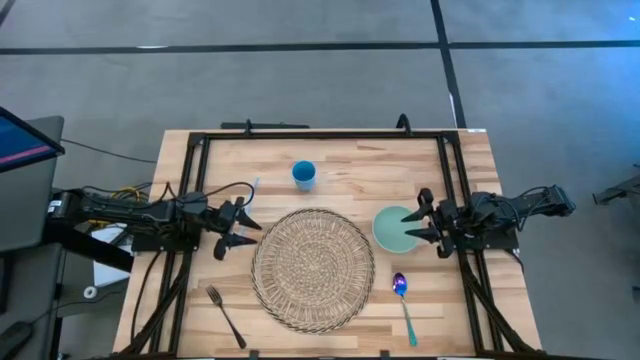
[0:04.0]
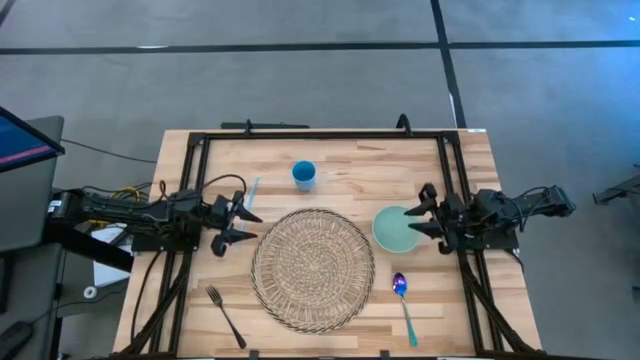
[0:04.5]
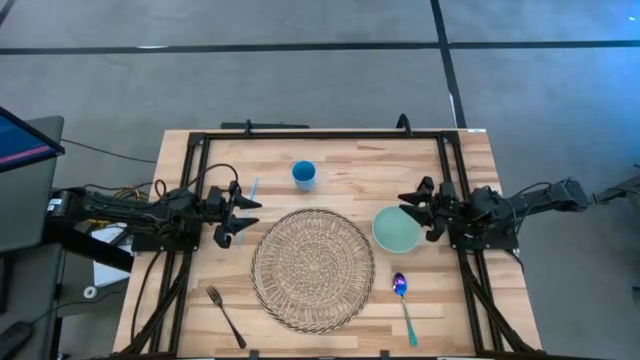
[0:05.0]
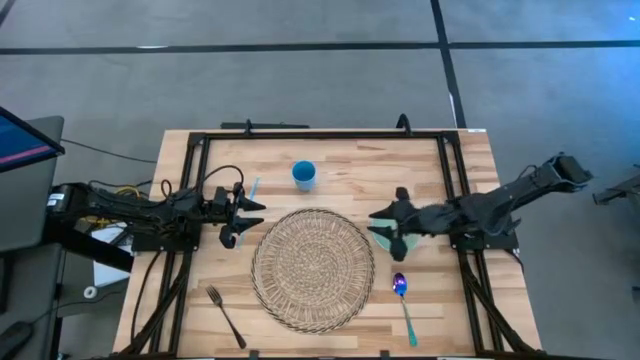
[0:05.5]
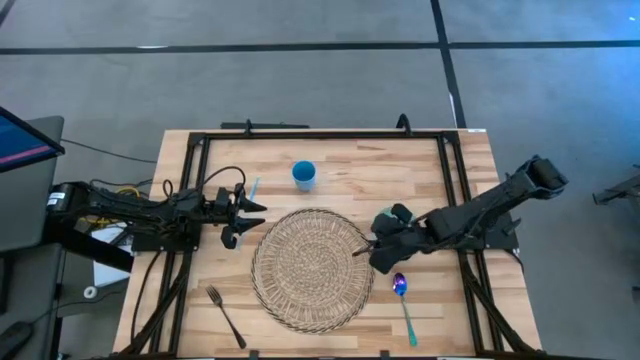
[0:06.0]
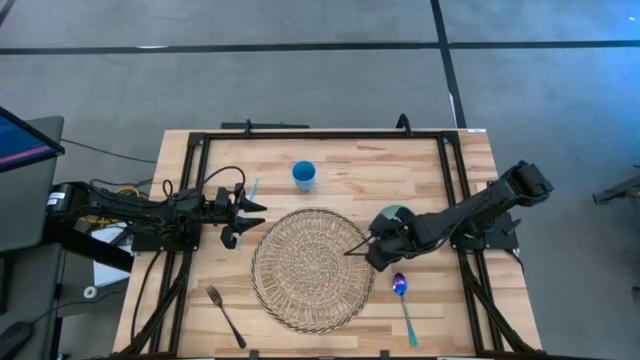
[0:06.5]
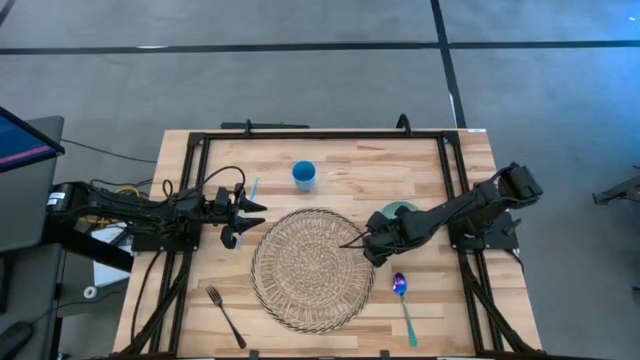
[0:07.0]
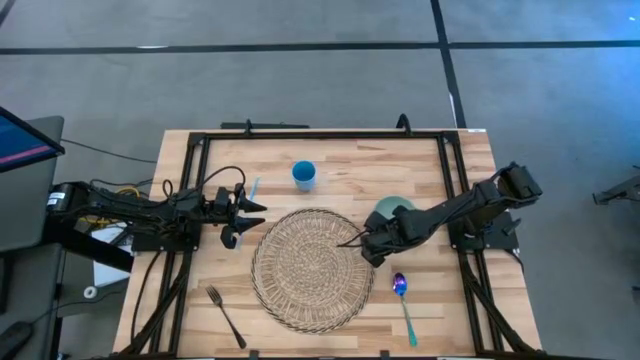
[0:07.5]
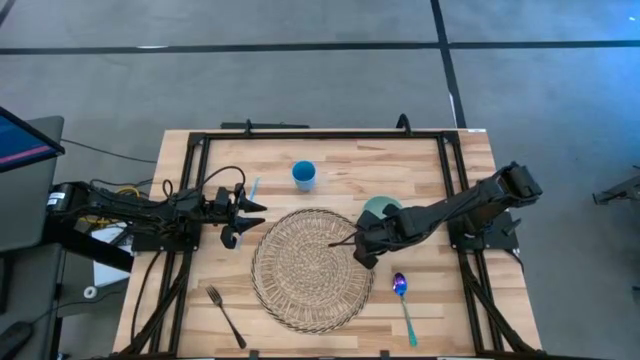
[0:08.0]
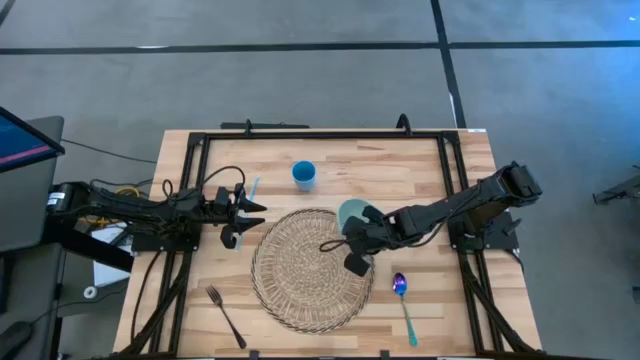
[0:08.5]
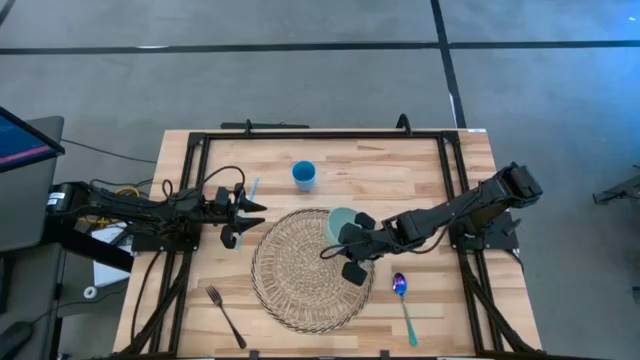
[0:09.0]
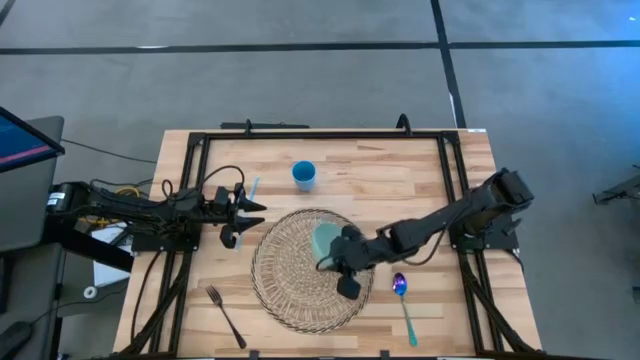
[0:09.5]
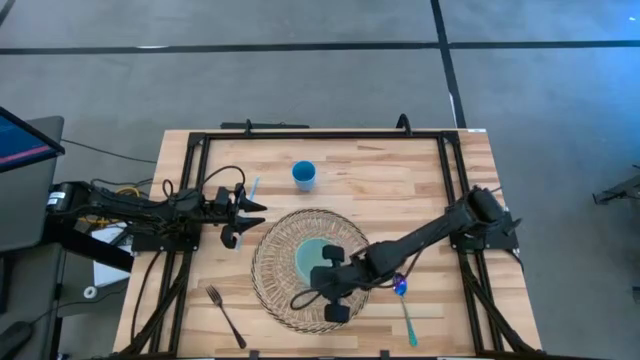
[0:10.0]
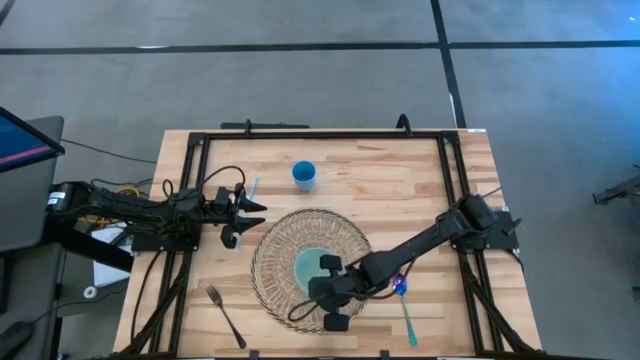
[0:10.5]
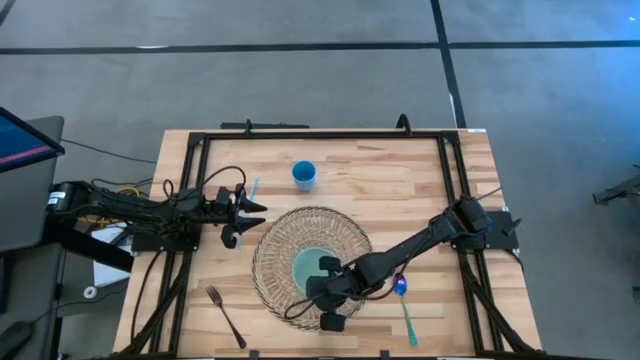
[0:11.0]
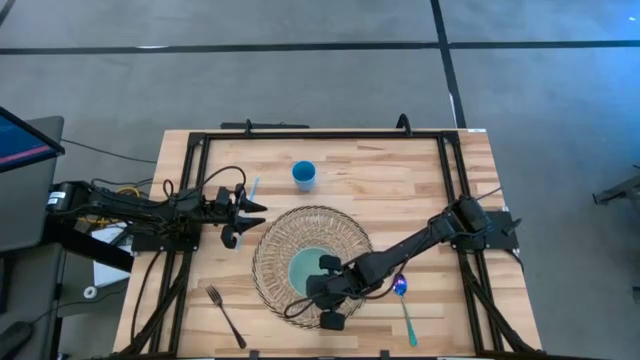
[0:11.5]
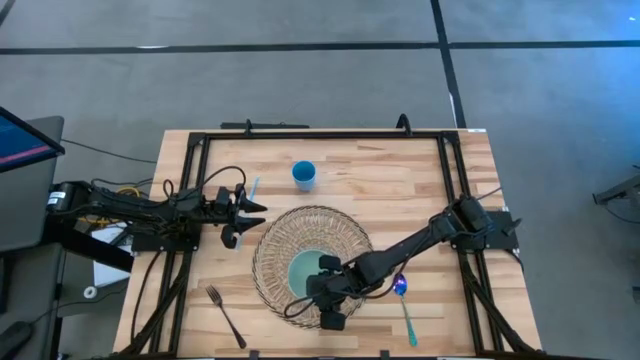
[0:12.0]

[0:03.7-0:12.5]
Task: Pick & Place Utensil
Put the green bowl on the brown placemat

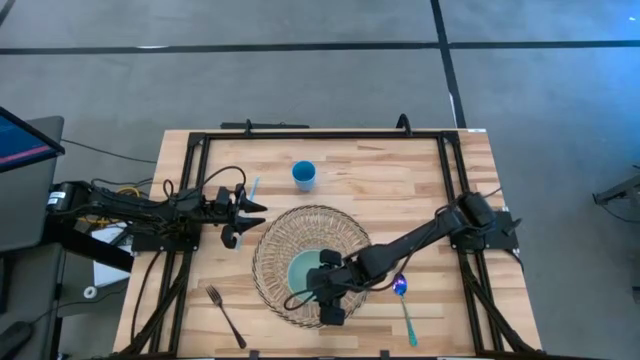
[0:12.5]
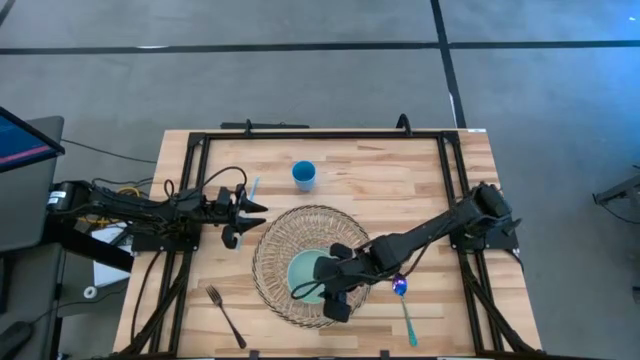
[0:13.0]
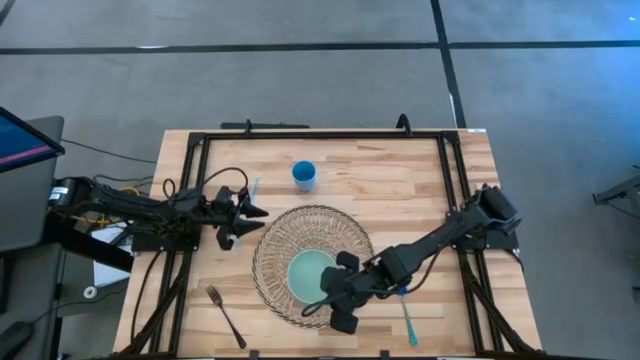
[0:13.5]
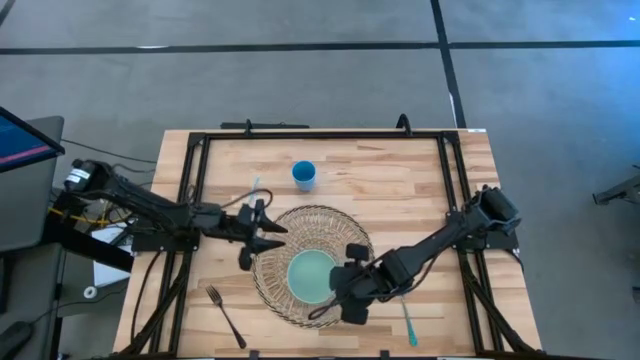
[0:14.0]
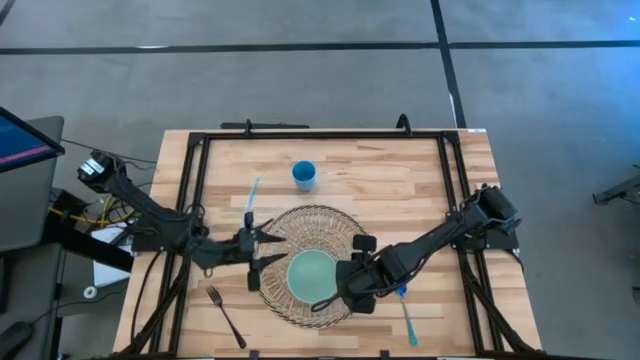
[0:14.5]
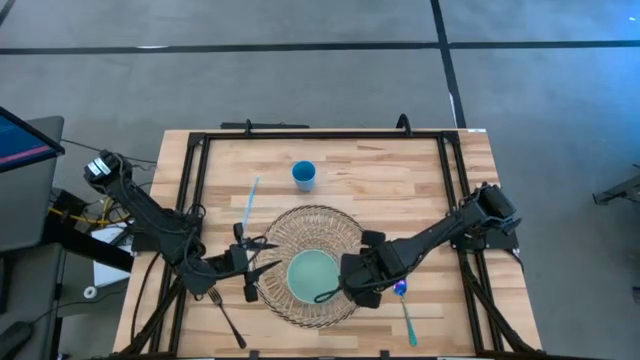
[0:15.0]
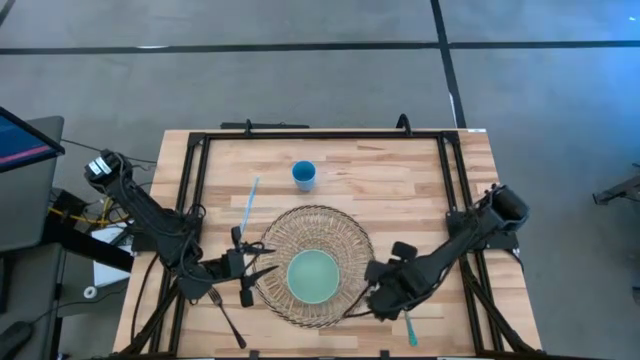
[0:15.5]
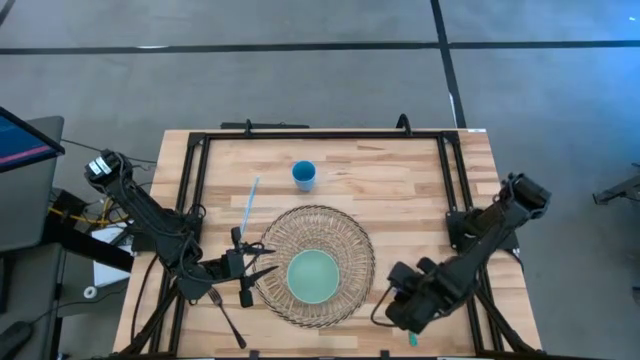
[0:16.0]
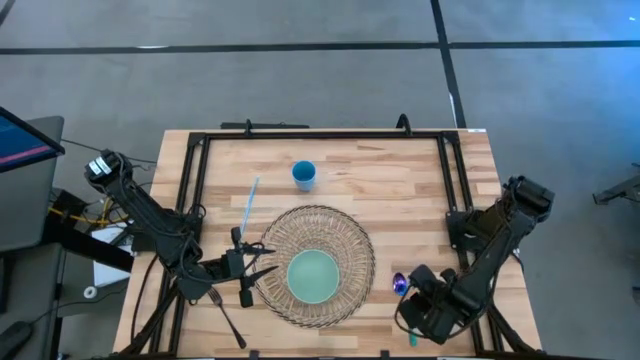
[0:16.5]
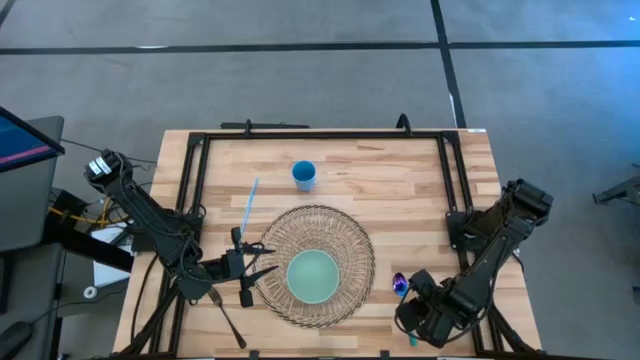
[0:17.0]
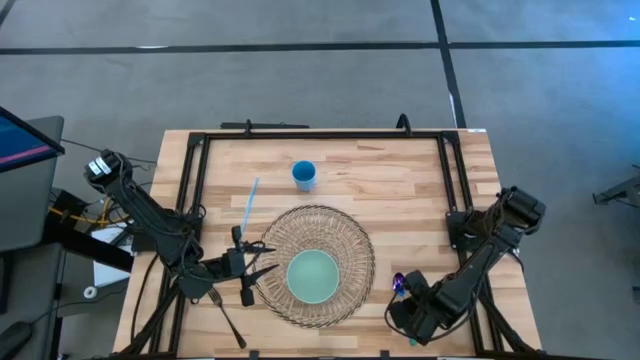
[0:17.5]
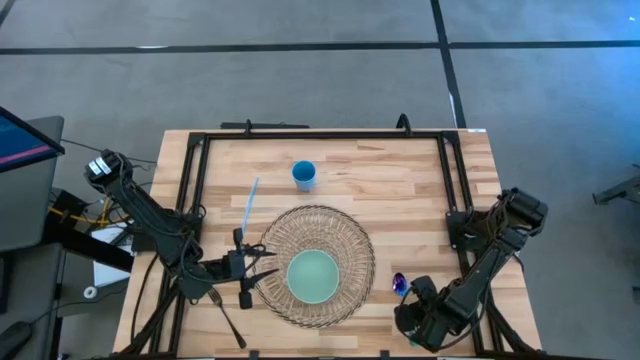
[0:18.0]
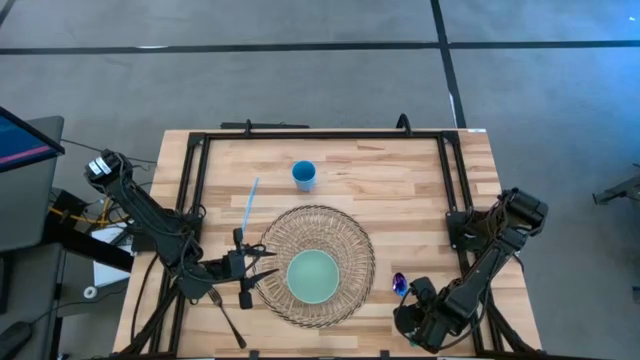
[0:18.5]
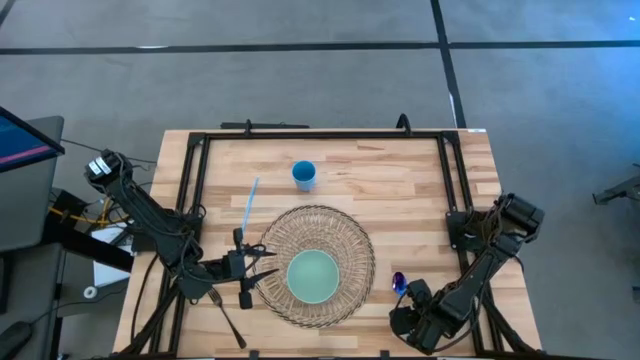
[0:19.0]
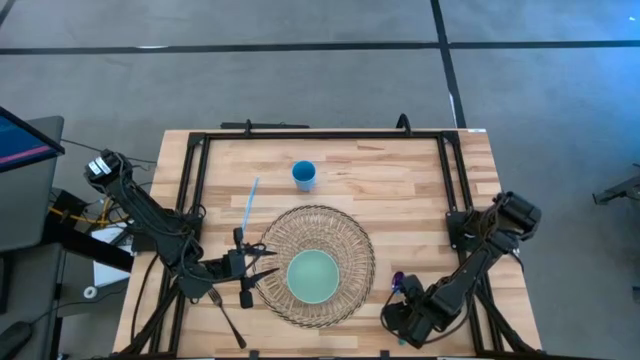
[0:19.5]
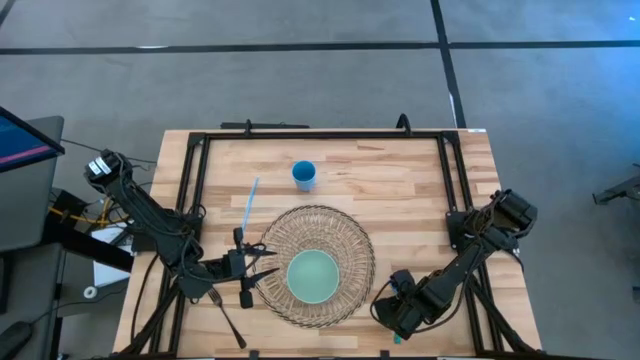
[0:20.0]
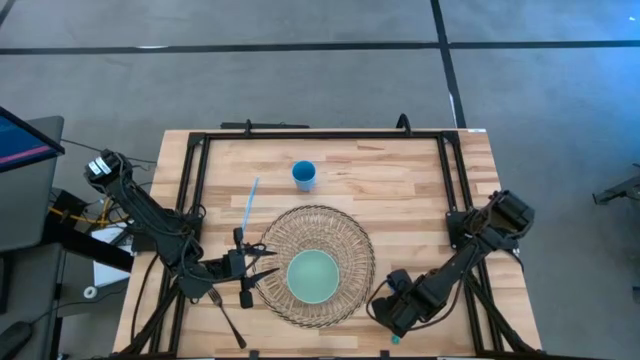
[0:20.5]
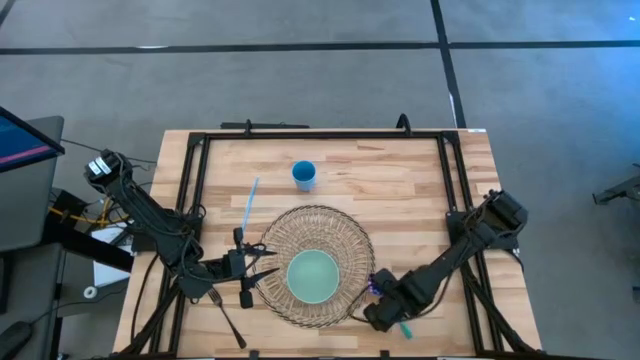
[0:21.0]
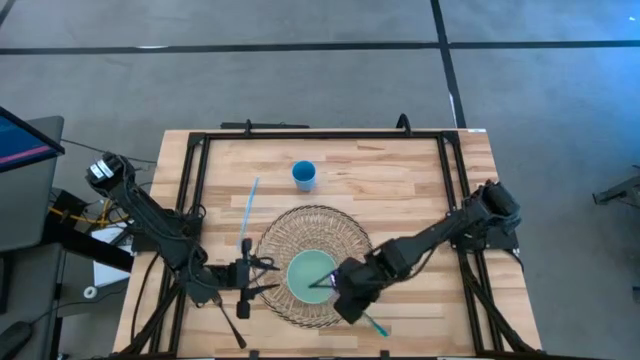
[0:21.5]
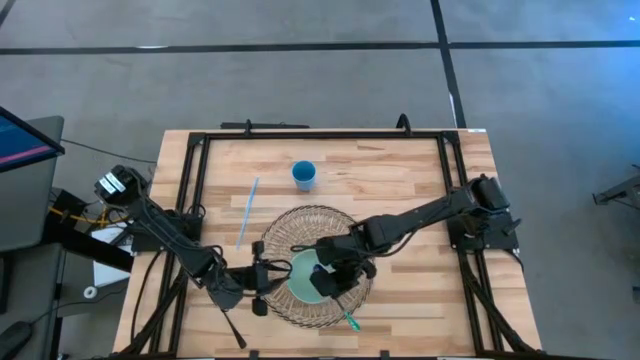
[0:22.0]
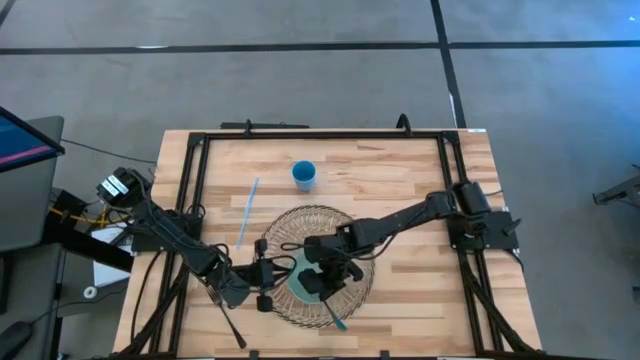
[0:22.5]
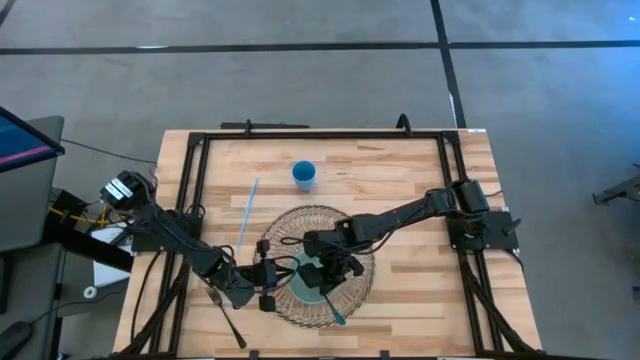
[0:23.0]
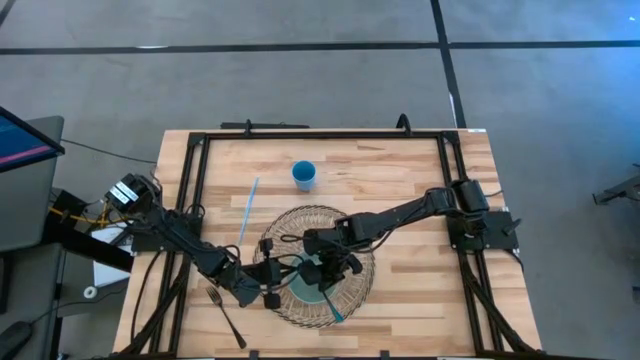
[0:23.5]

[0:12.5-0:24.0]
Put the blue spoon into the green bowl on the brown placemat

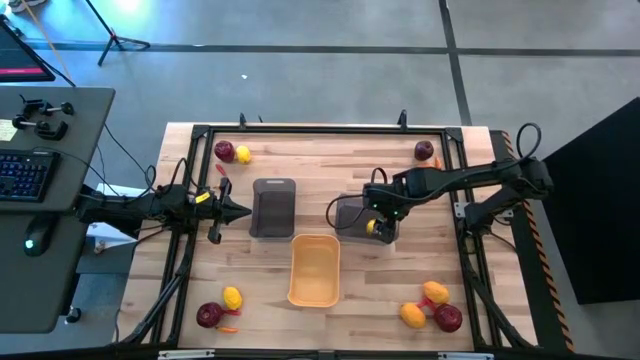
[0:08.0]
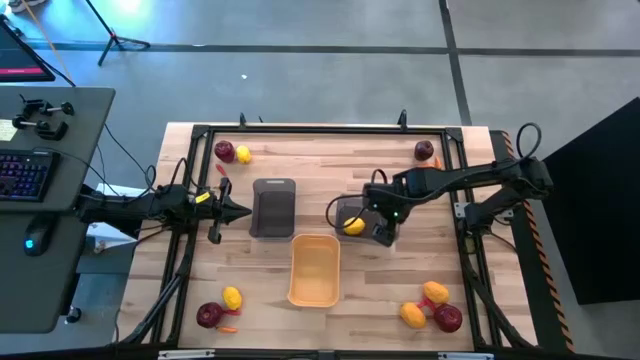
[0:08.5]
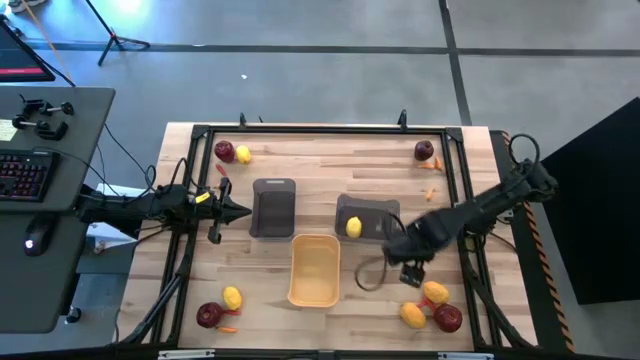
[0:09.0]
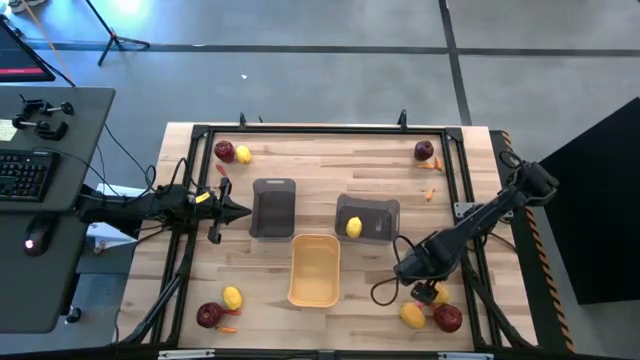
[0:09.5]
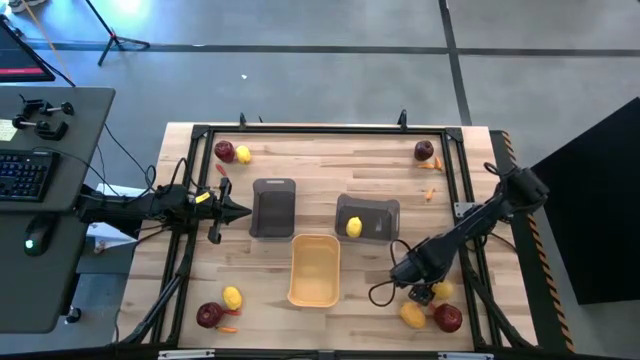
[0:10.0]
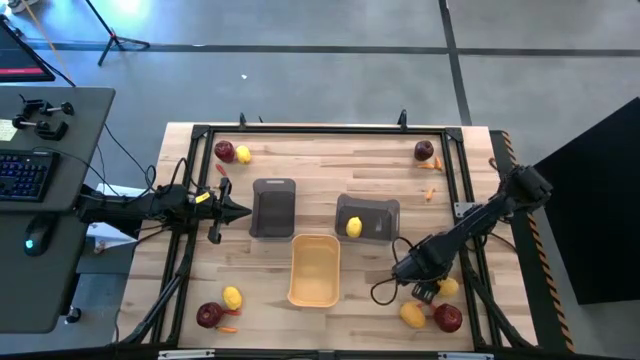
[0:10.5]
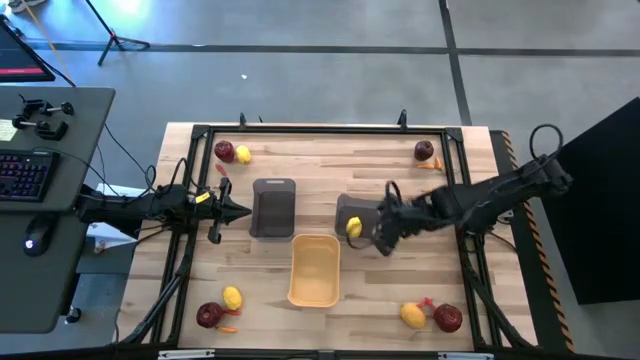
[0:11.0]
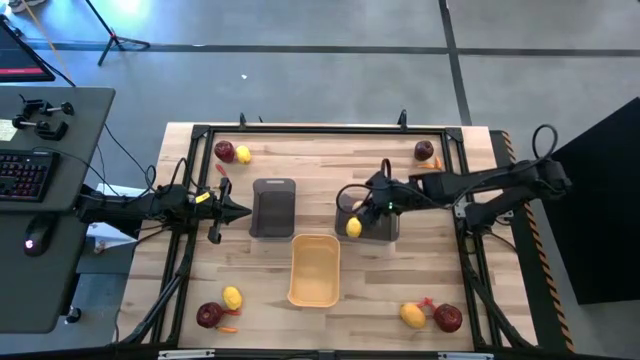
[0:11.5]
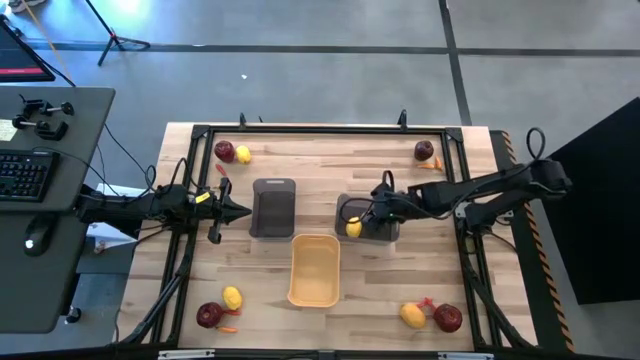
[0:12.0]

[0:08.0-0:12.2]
Task: Sort produce into baskets
Put the lemon into the right black bin
